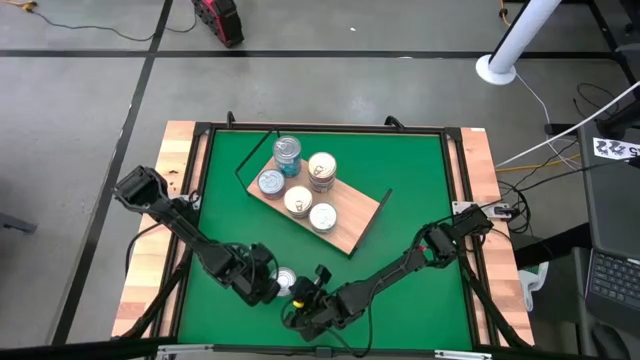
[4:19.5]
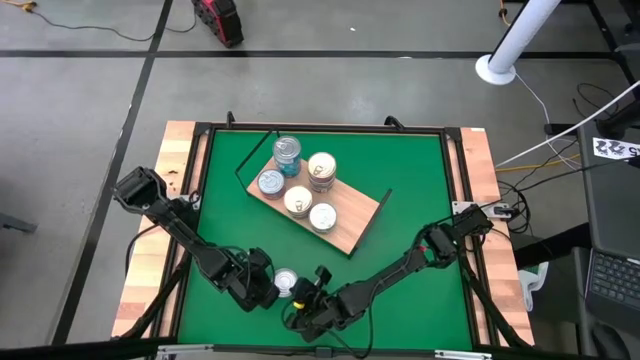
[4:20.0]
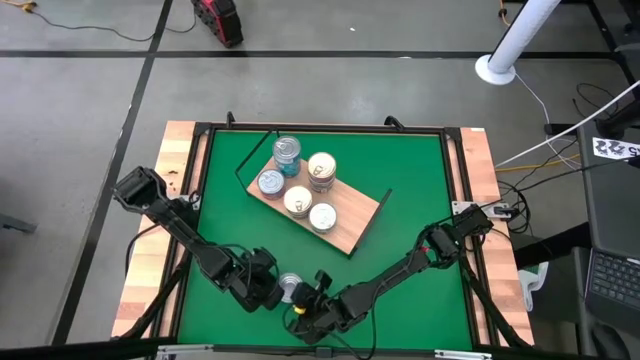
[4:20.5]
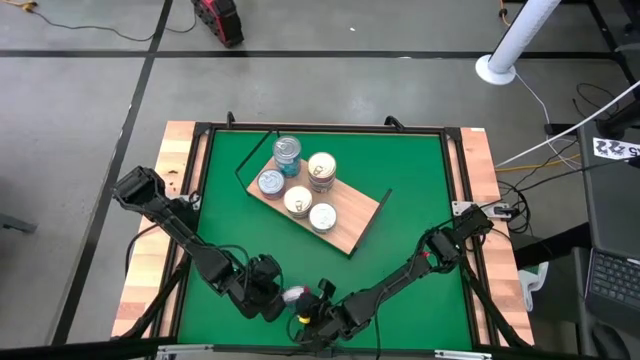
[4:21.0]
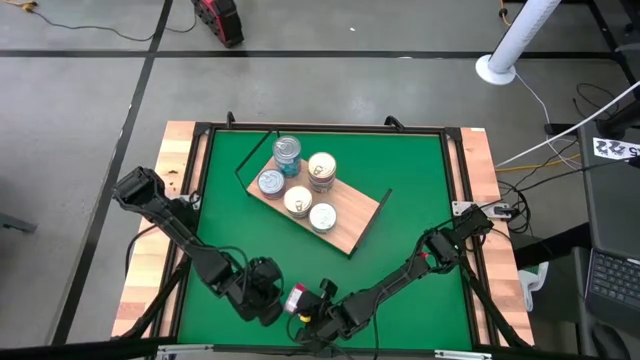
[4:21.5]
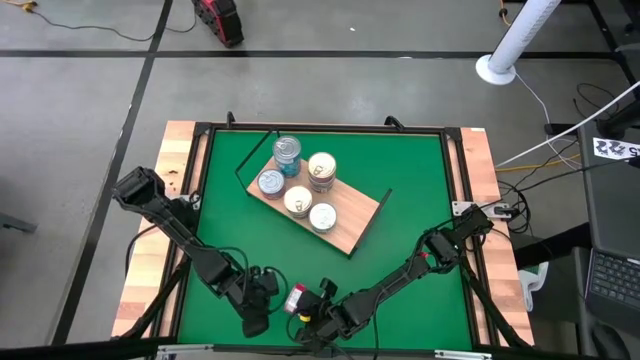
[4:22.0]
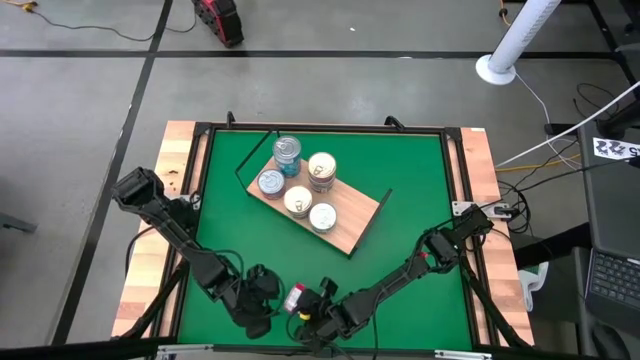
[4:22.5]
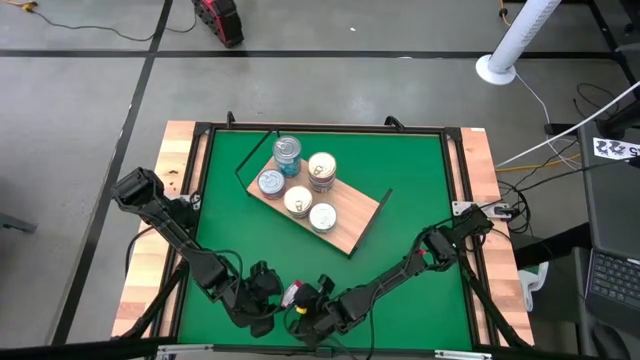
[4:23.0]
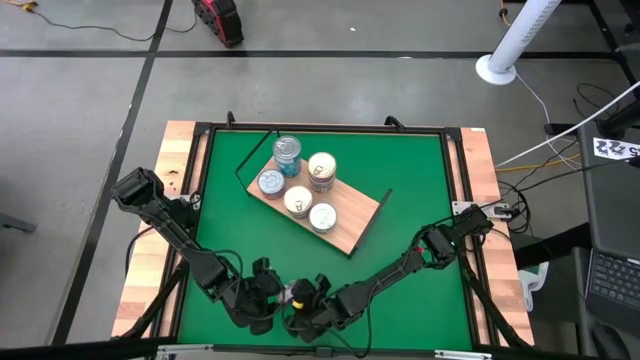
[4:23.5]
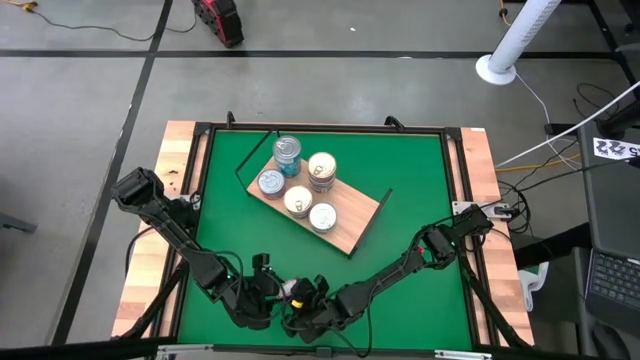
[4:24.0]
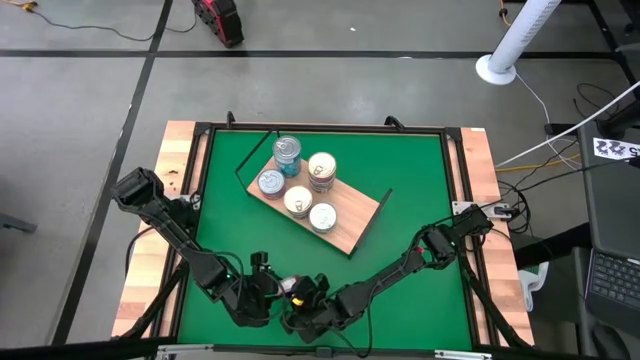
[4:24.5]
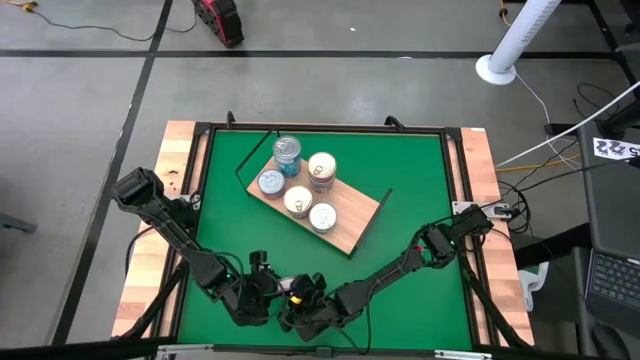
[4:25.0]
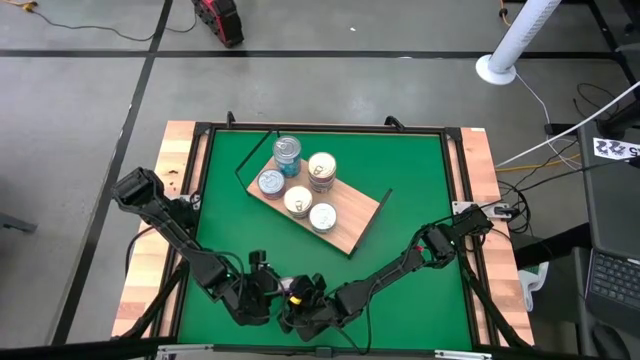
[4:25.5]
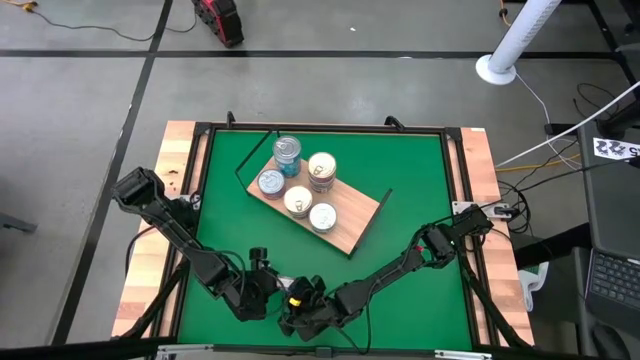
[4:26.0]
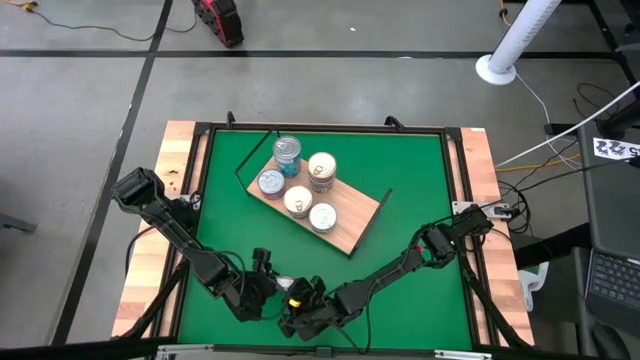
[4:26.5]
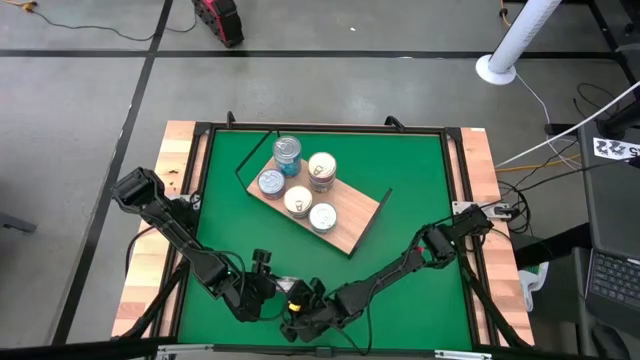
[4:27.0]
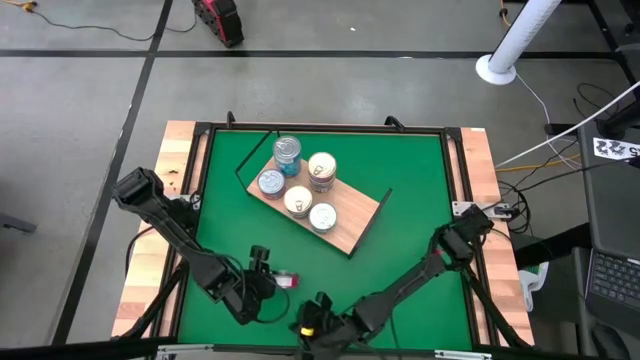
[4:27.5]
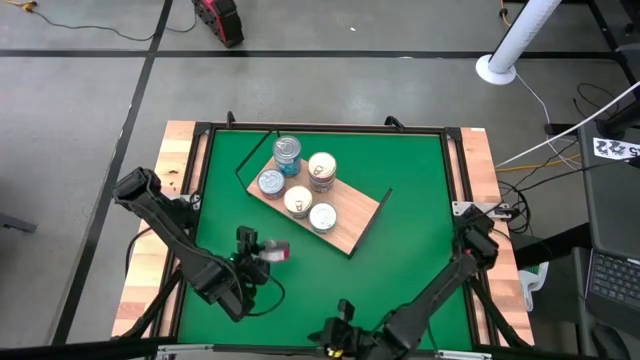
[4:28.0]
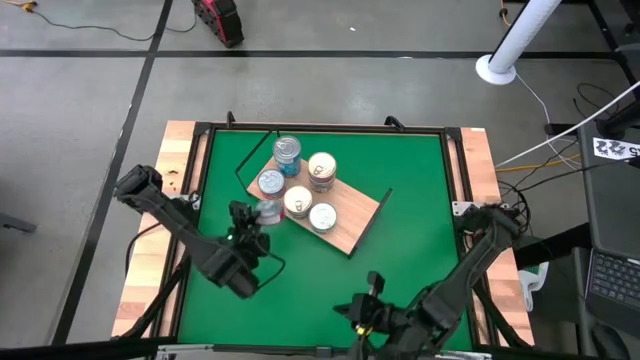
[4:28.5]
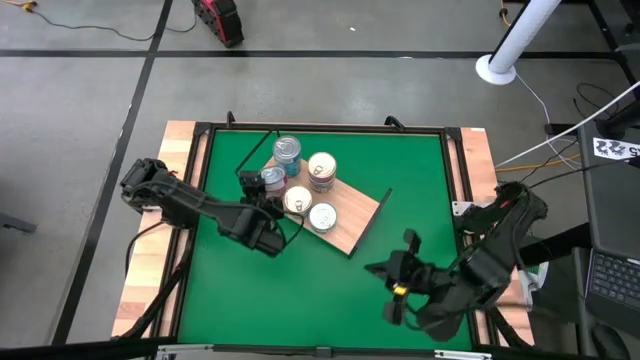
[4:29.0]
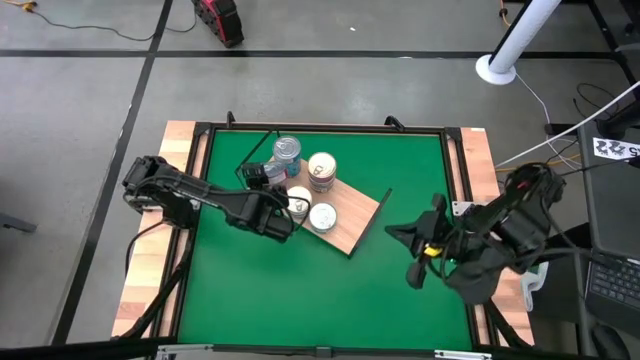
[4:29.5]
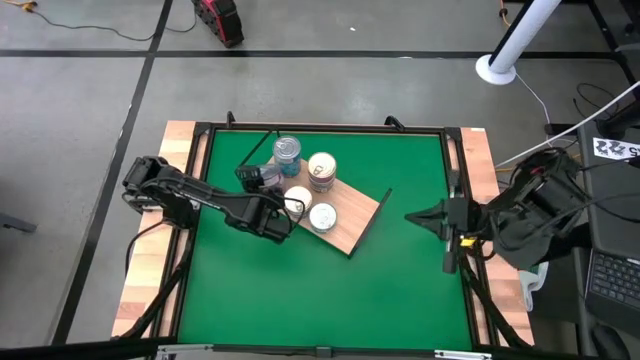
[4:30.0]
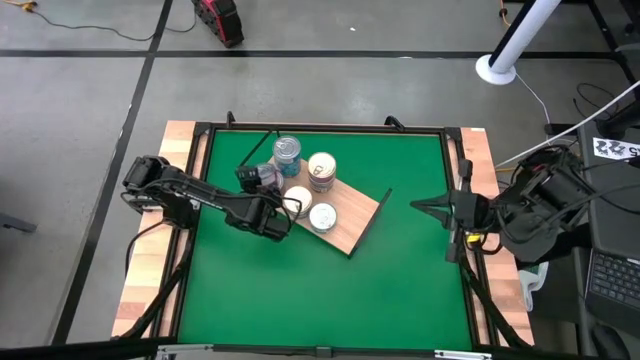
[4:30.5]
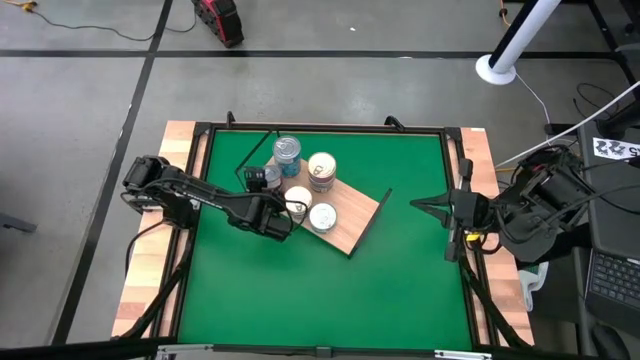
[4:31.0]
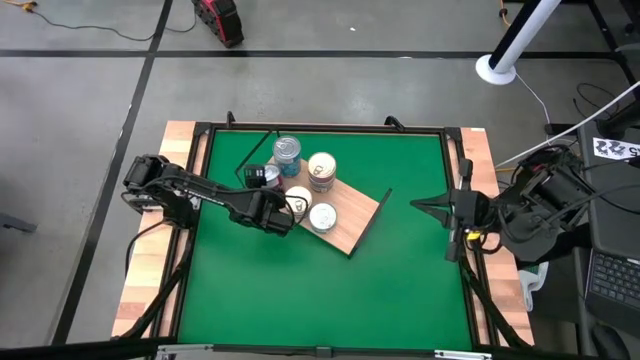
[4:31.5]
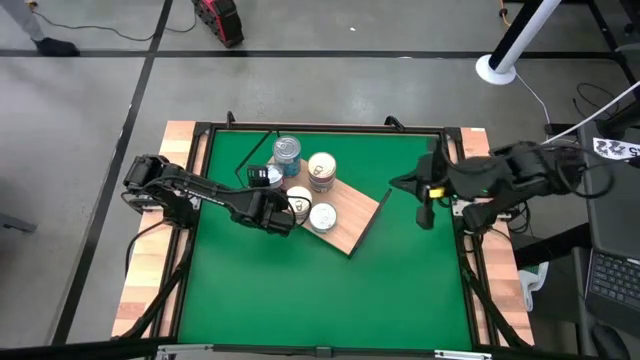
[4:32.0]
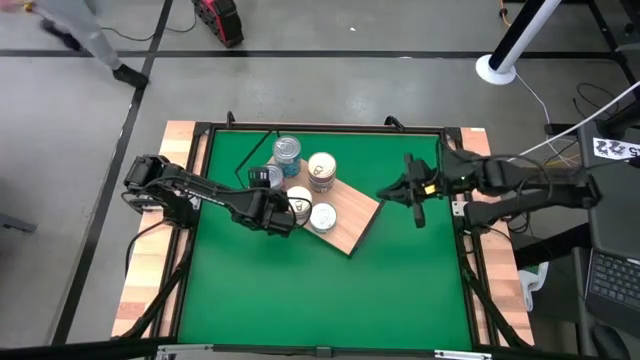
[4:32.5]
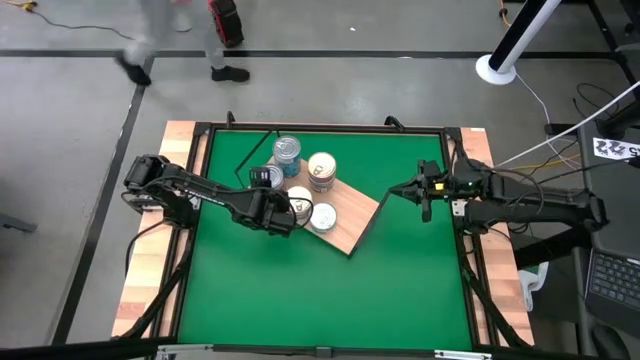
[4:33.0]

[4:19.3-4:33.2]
Task: Stack canned seafood by type on shelf
Stack the blue and pink tuna can on top of the blue and pink tuna can on the shelf

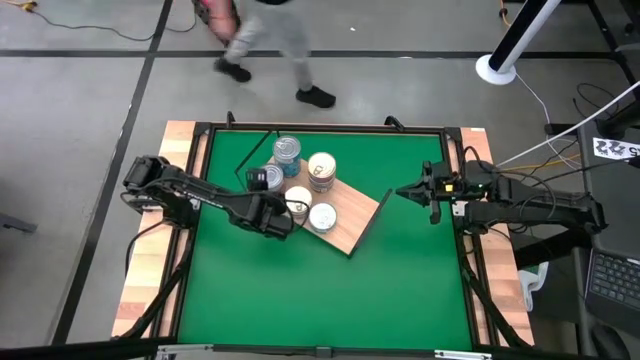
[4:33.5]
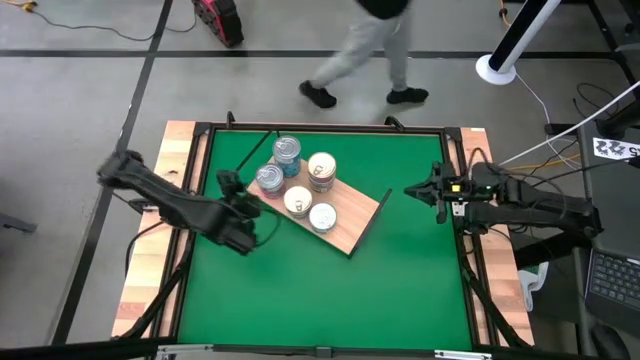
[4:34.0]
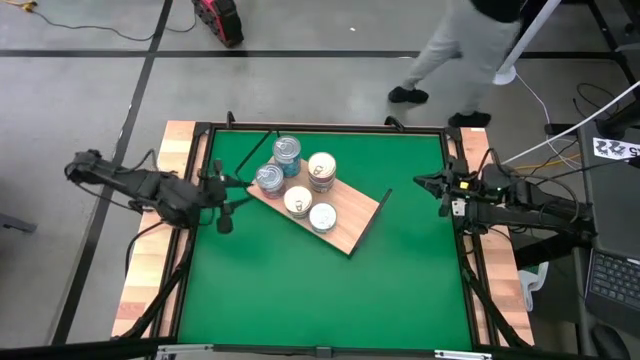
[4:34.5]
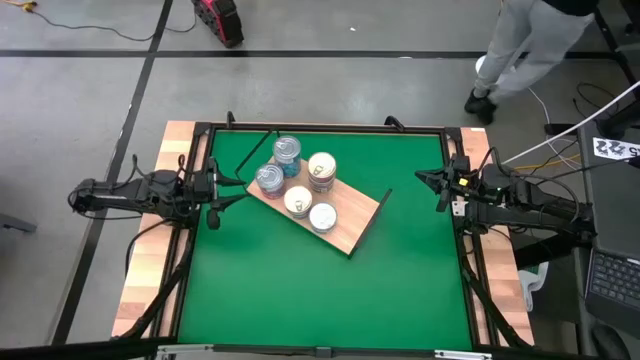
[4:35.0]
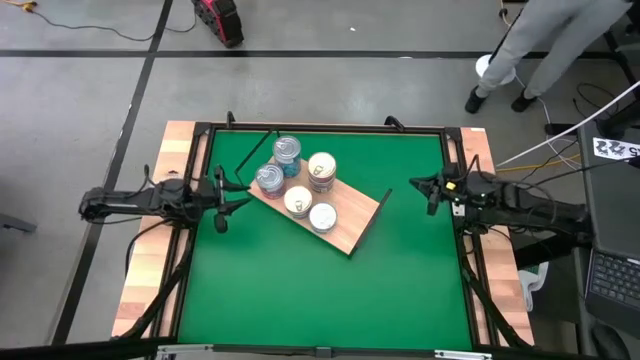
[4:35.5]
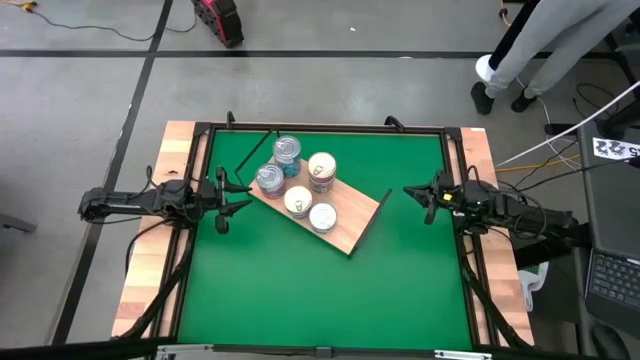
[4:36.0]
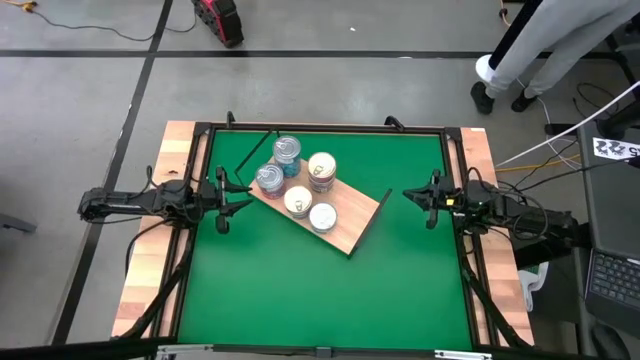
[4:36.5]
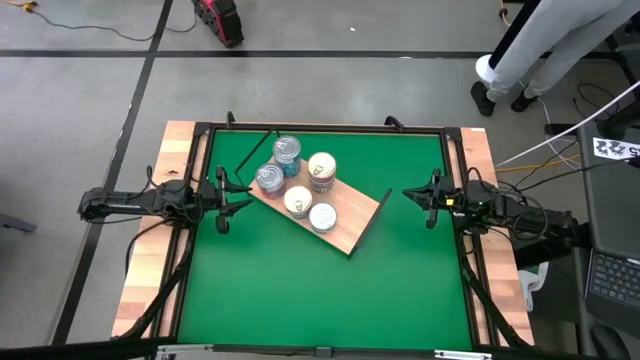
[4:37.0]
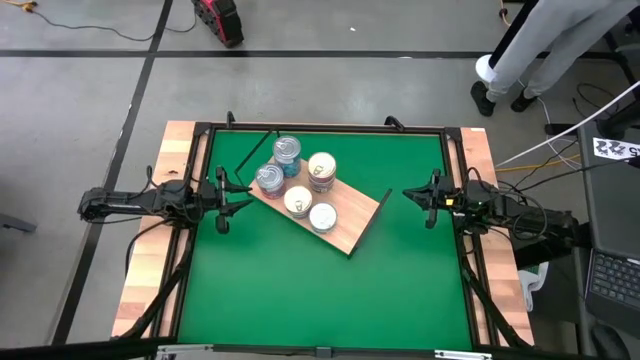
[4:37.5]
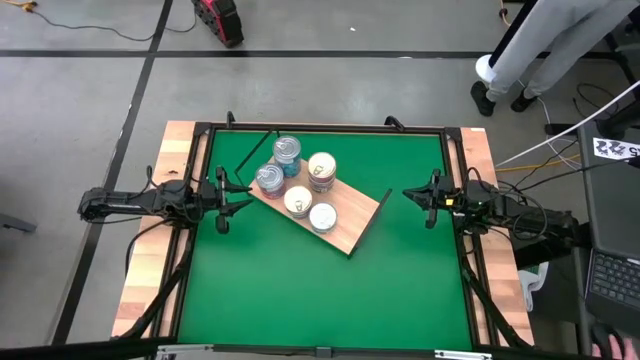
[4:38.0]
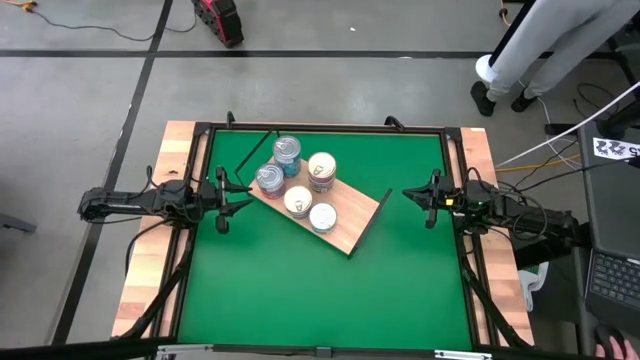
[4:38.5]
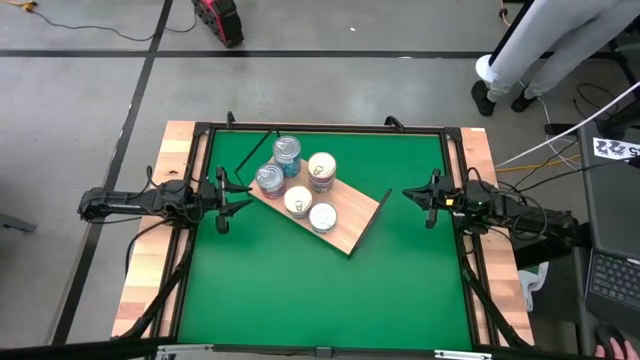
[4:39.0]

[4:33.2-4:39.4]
Return to Home Position

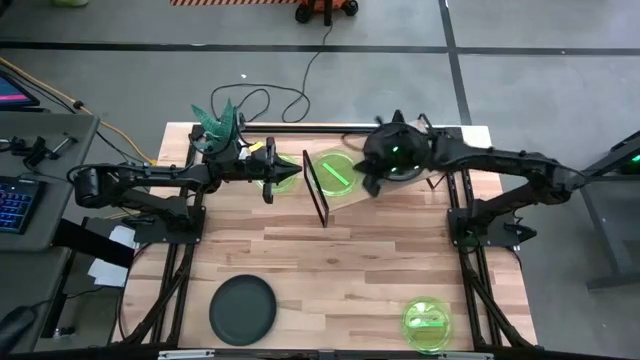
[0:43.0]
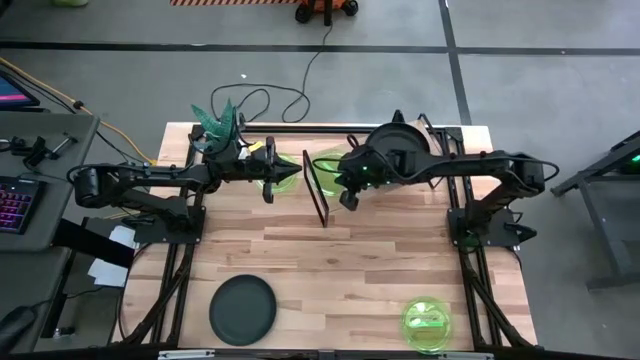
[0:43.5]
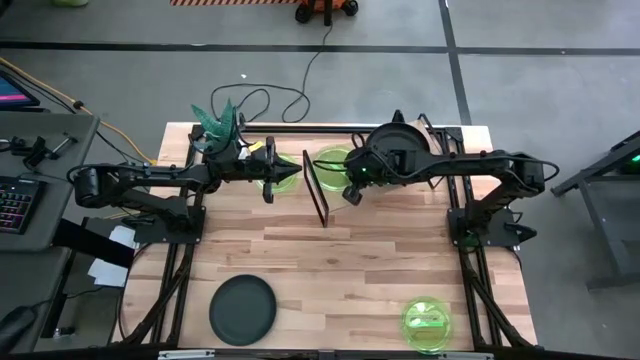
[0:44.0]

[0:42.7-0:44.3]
Task: Place and stack plates onto a shelf
Adjust the green plate on the shelf
